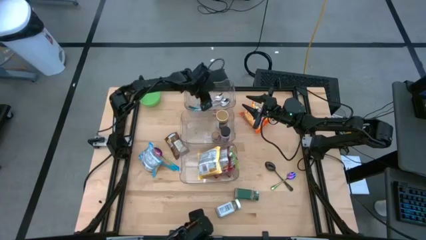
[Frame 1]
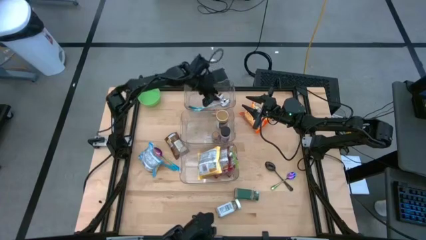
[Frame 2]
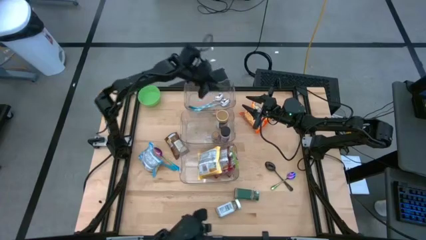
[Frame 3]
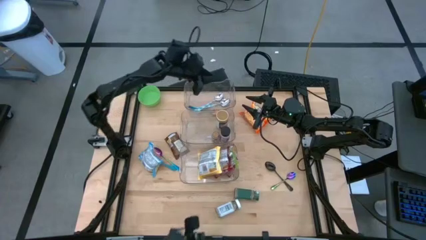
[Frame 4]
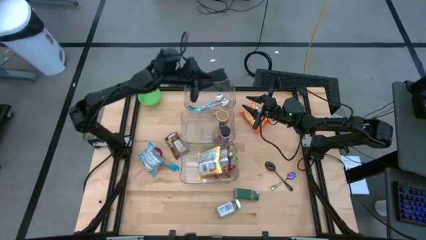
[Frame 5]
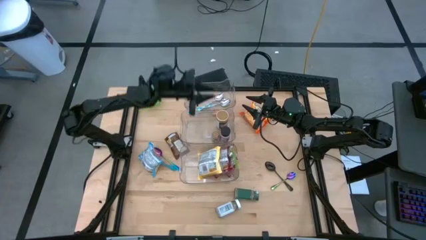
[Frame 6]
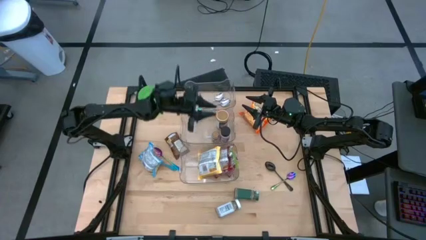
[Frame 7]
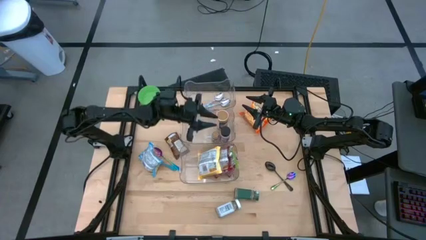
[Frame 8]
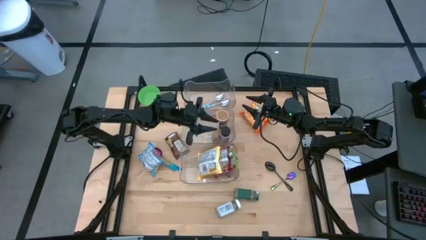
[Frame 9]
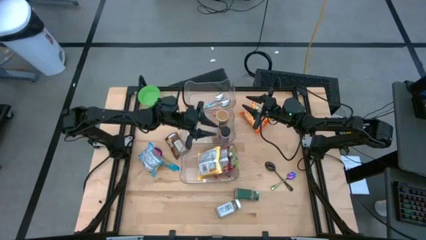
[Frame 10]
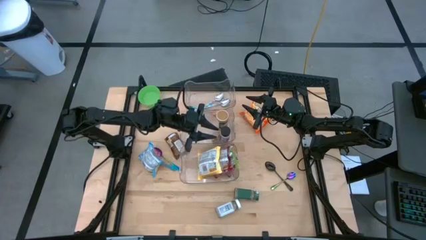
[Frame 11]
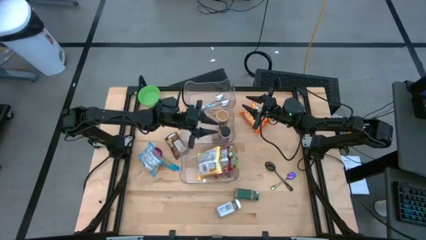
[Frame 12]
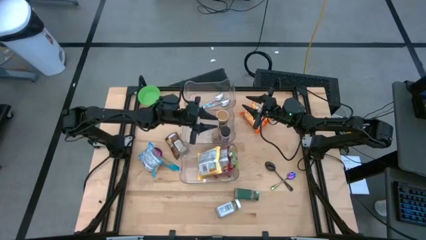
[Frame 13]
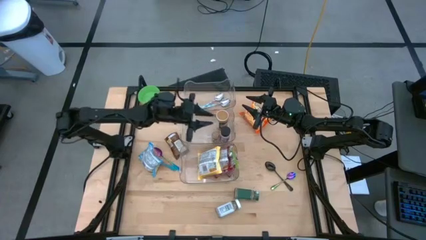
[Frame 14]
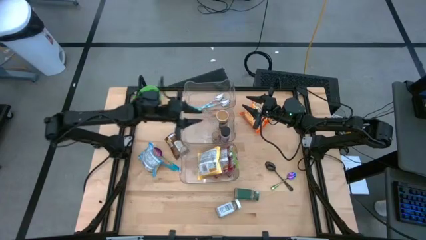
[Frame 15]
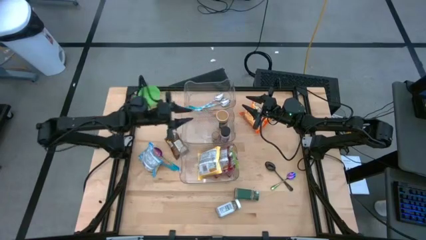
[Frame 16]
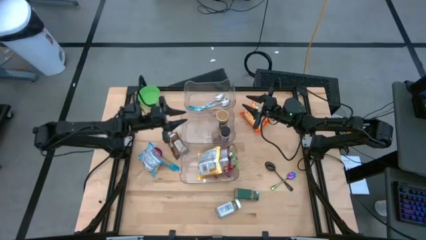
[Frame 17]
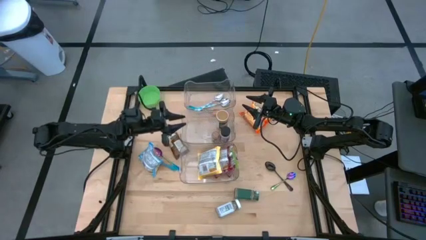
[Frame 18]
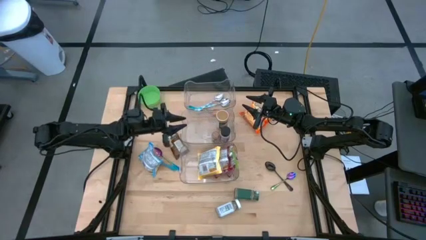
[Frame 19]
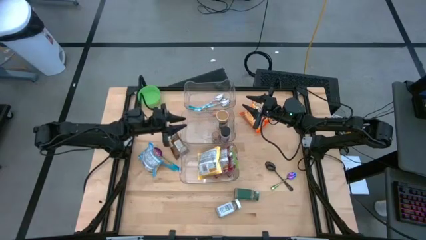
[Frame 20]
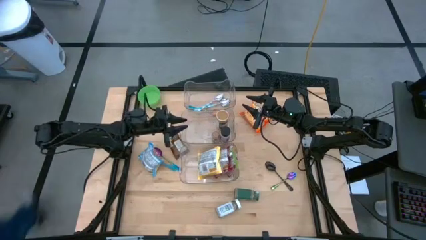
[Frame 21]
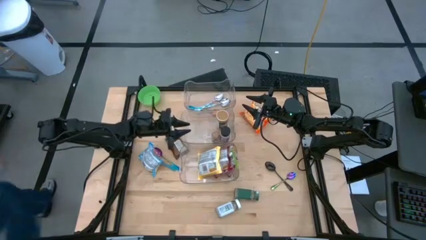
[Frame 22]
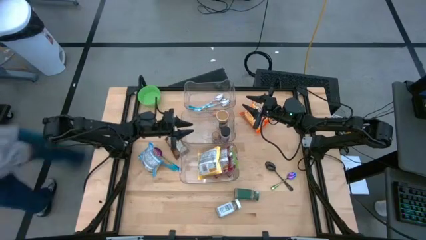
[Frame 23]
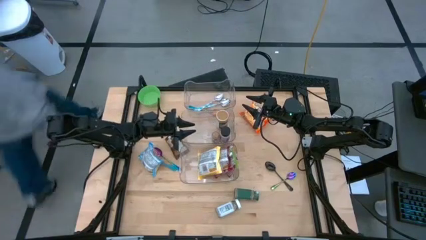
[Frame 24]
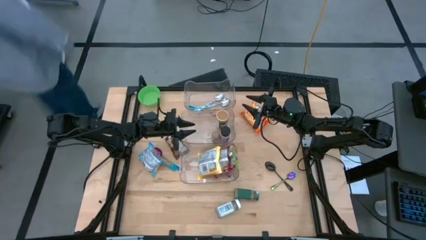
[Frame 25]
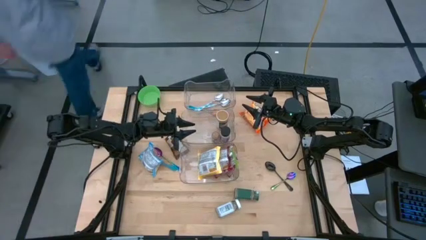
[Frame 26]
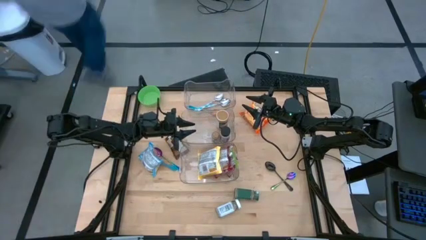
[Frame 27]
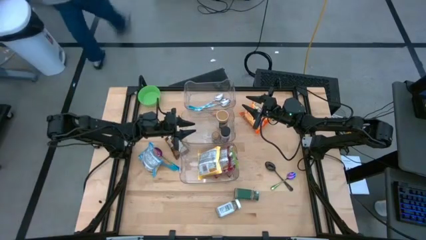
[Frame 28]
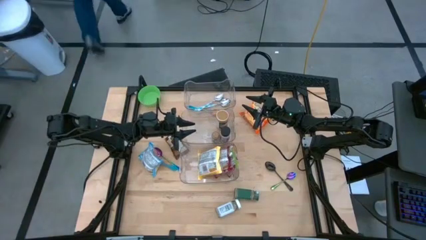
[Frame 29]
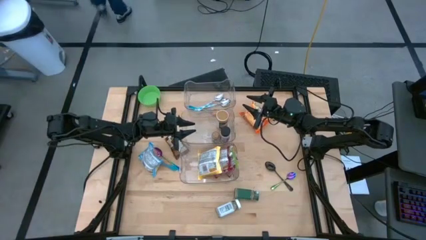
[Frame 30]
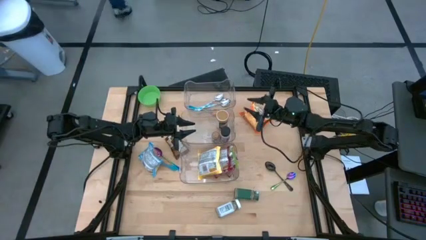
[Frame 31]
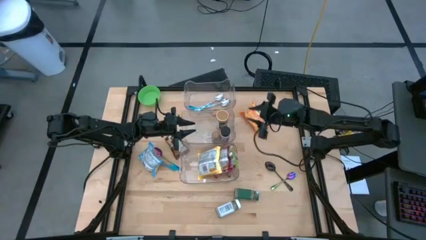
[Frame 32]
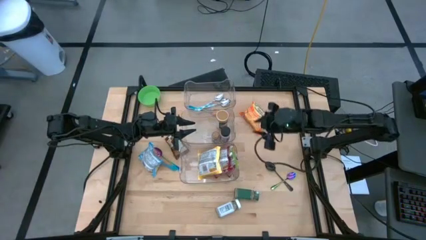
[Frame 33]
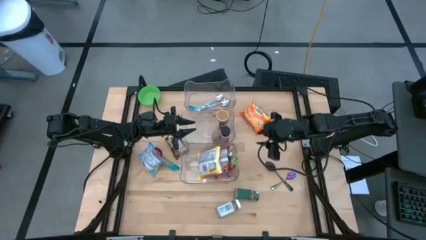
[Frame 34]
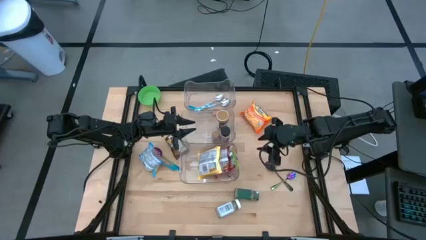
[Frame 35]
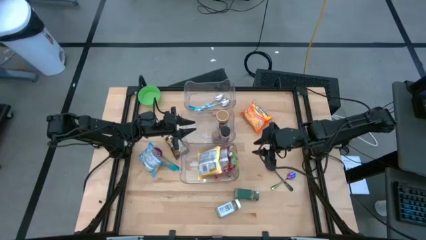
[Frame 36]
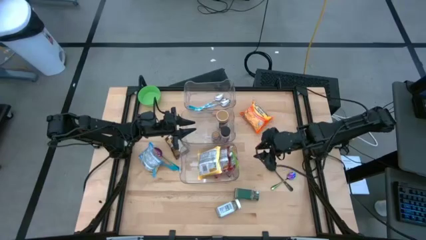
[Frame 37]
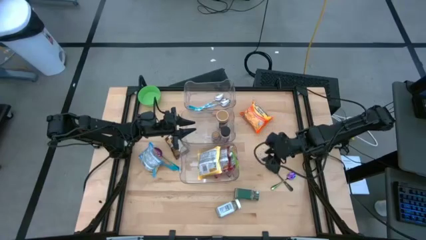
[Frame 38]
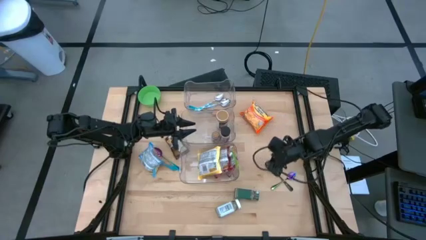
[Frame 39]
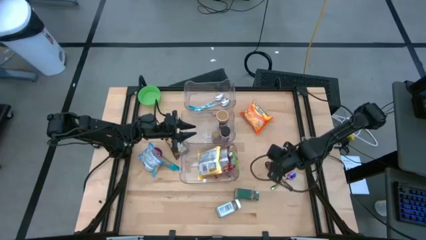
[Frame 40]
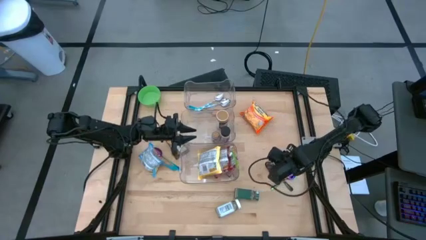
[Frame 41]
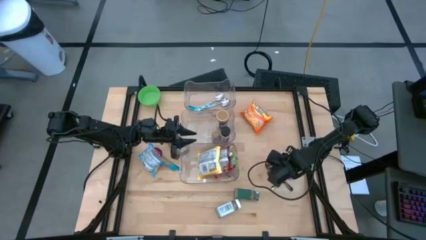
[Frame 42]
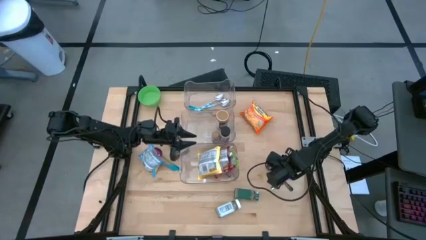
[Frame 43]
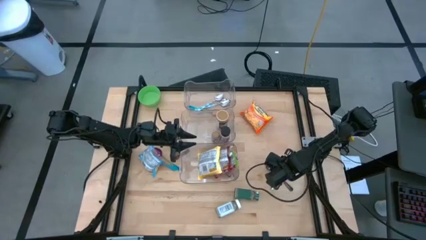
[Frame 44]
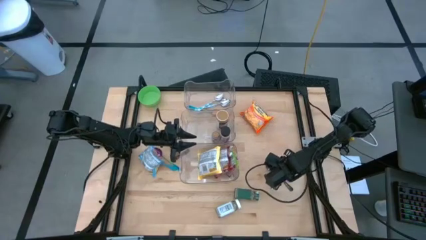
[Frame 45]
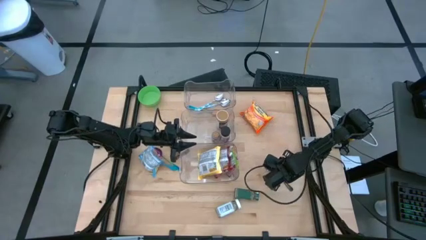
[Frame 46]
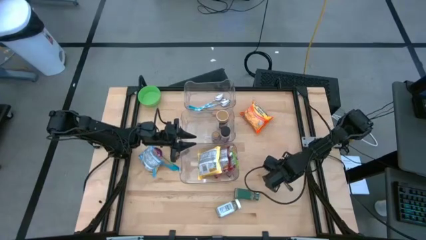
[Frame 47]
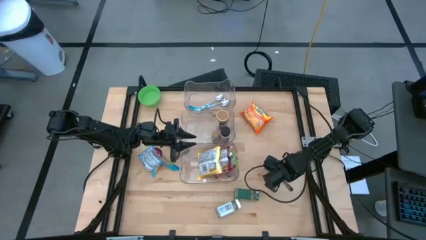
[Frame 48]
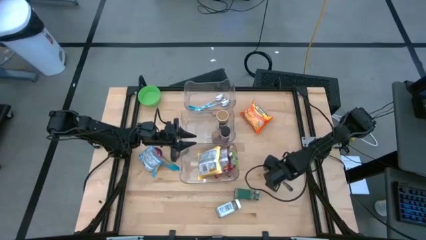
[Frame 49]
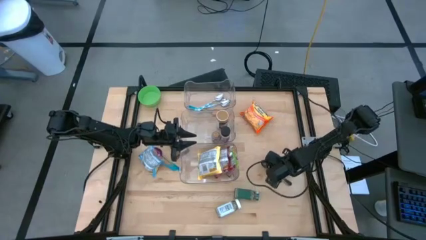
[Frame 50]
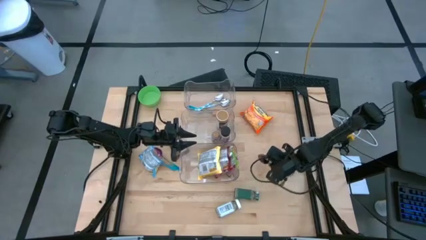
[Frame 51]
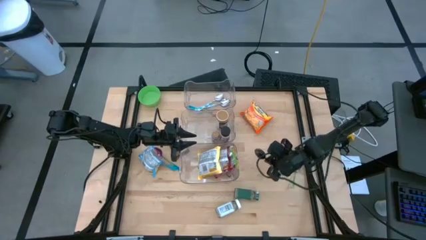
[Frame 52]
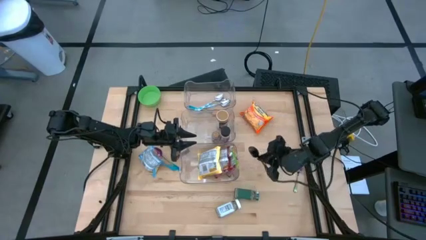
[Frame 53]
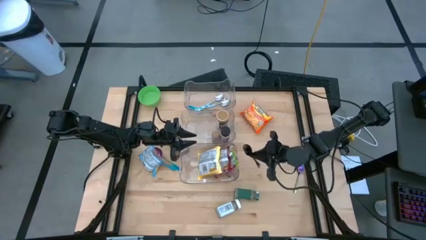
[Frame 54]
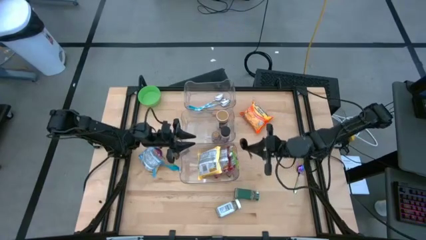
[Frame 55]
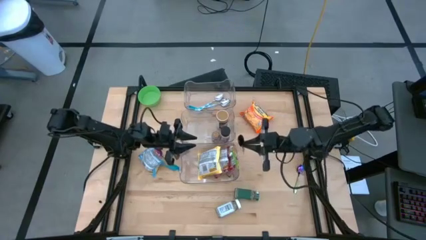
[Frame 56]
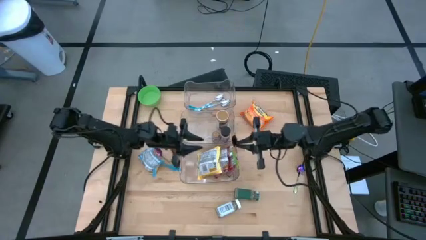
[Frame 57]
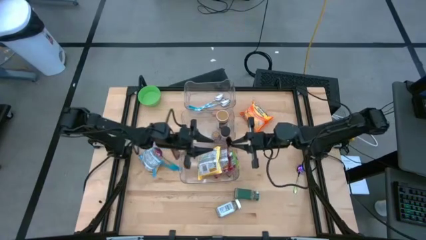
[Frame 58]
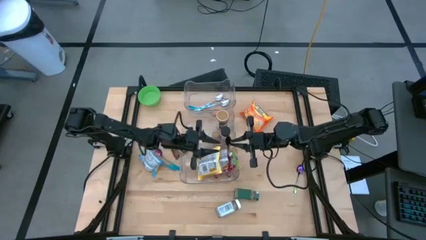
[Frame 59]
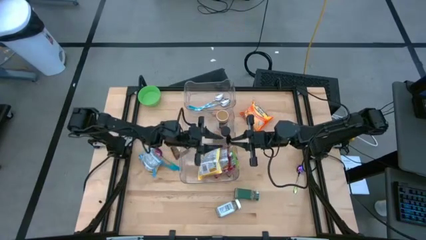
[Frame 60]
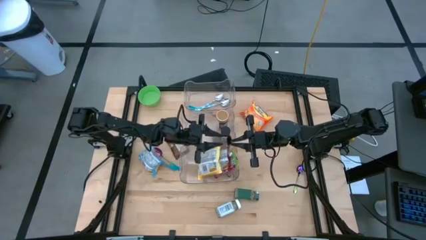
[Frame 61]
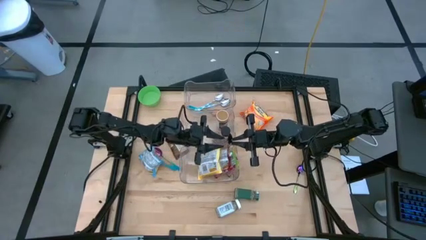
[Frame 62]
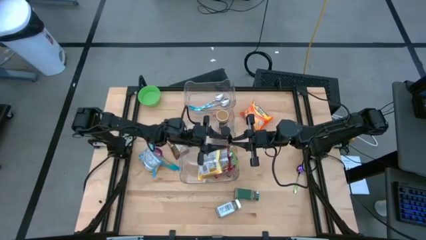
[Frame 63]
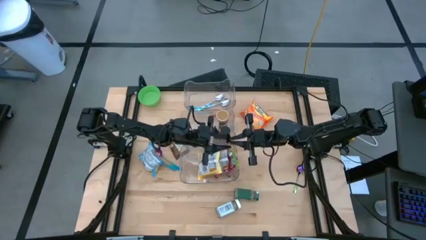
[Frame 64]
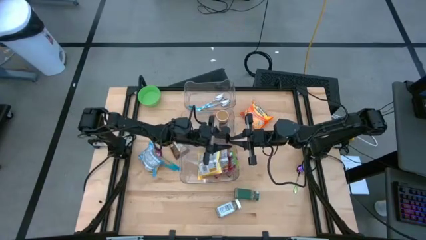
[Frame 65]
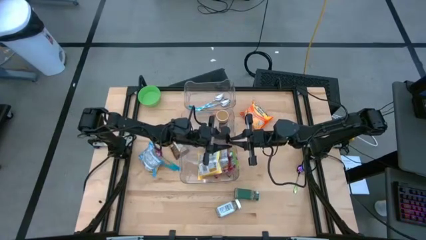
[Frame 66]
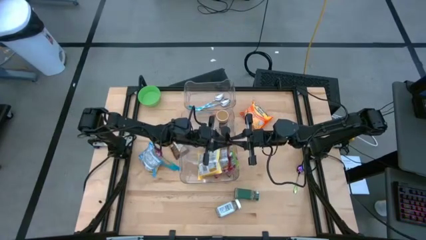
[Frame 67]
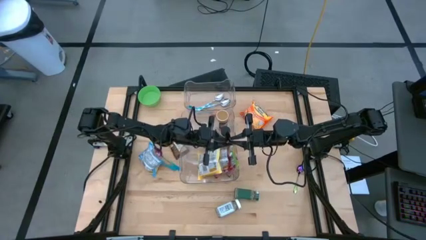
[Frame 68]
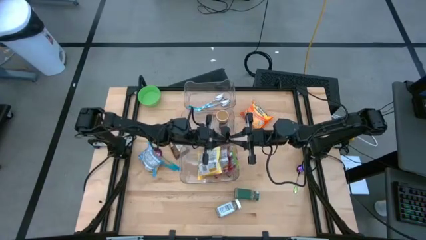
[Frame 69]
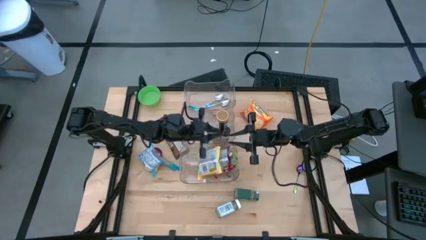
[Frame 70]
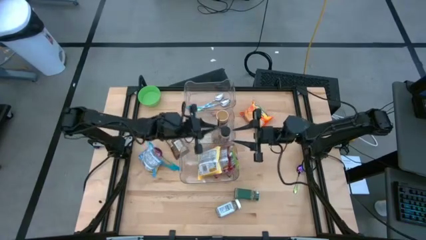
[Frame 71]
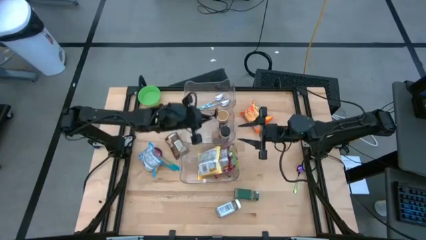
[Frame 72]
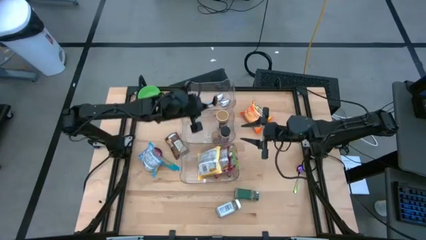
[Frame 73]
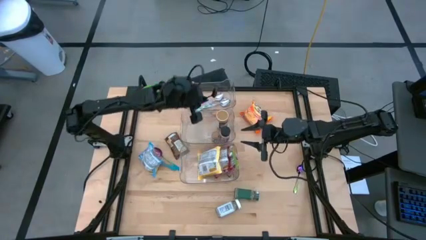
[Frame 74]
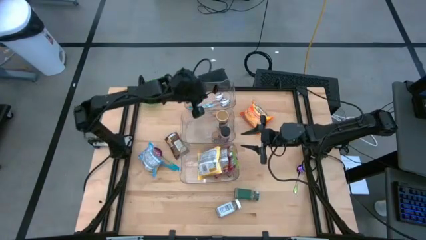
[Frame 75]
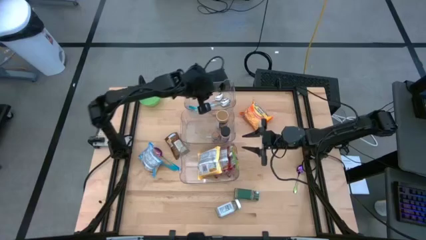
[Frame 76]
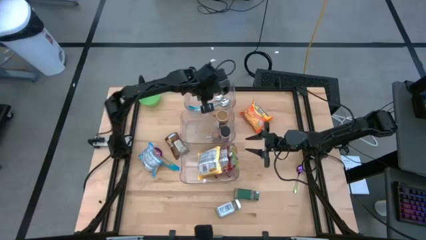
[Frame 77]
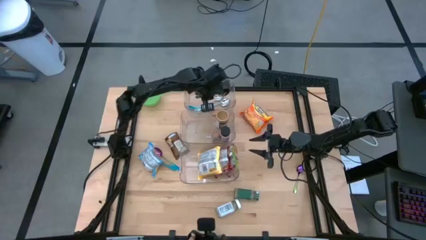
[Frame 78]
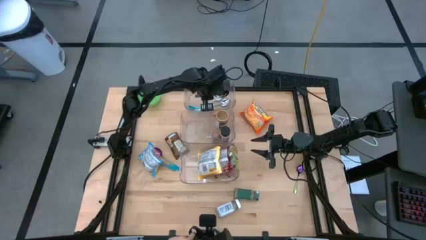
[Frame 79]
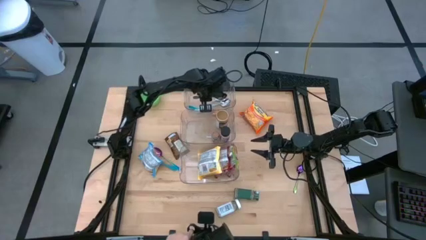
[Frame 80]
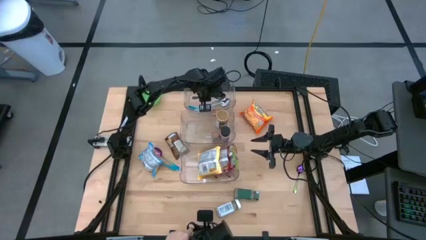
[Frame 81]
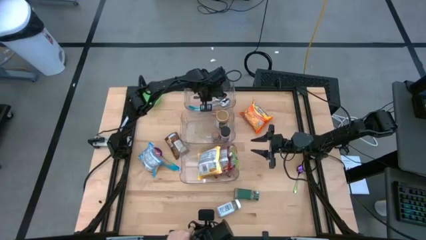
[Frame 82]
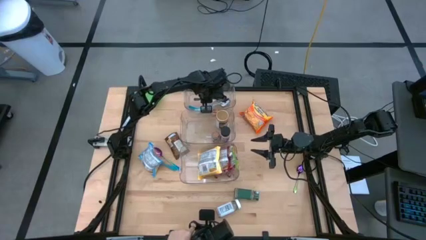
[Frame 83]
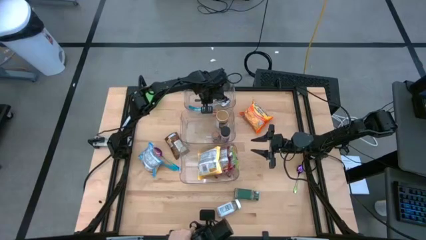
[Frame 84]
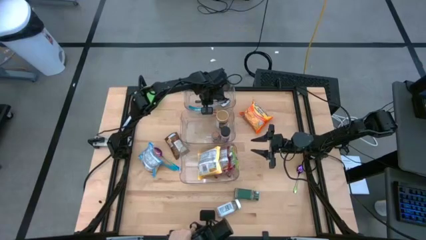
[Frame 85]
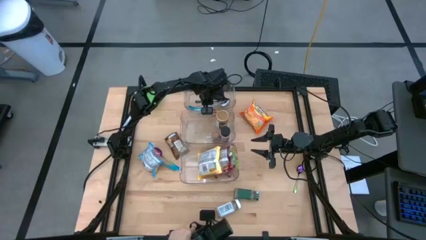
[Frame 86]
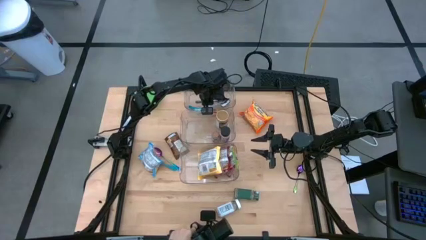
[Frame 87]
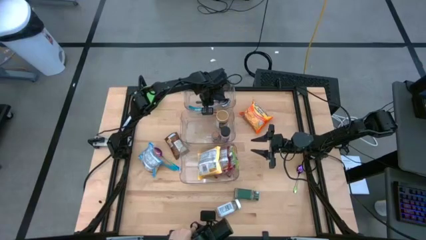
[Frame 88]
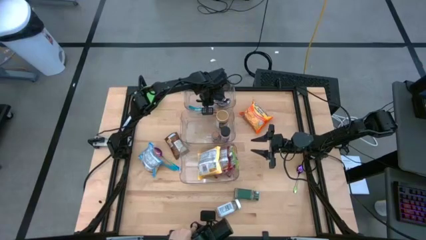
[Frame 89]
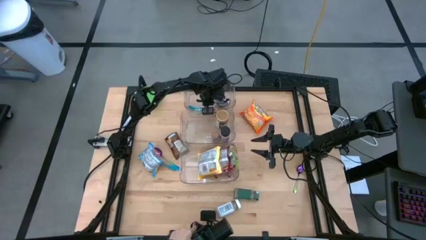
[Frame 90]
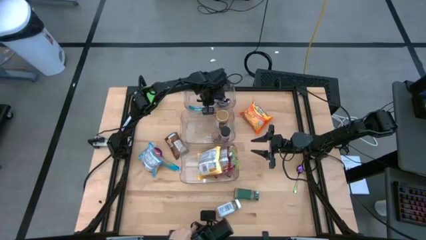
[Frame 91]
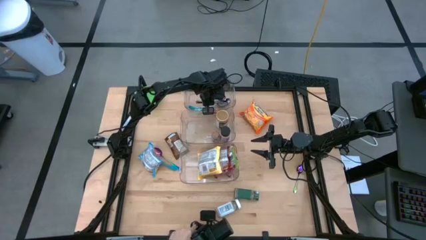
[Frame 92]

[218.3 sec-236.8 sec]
Task: Pick & Place Food Item
Put the black spoon into the top transparent bin
